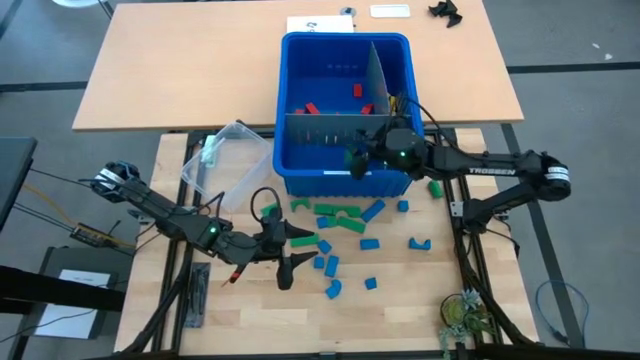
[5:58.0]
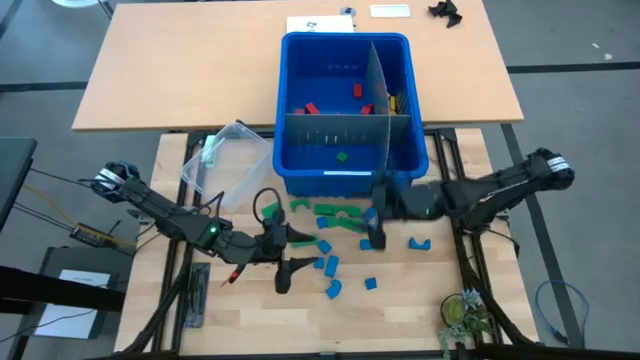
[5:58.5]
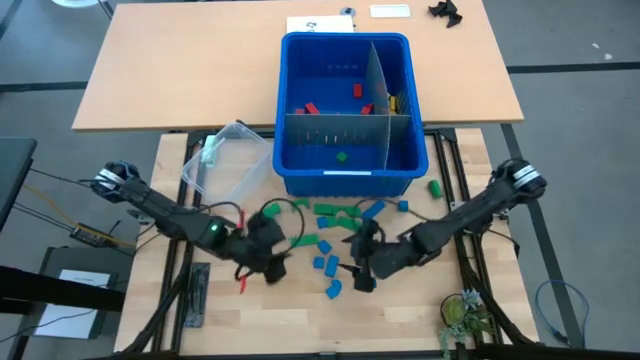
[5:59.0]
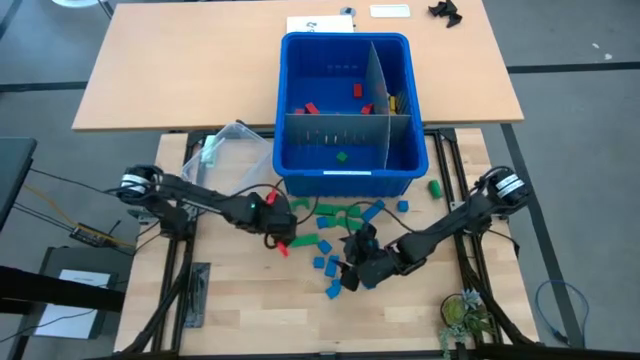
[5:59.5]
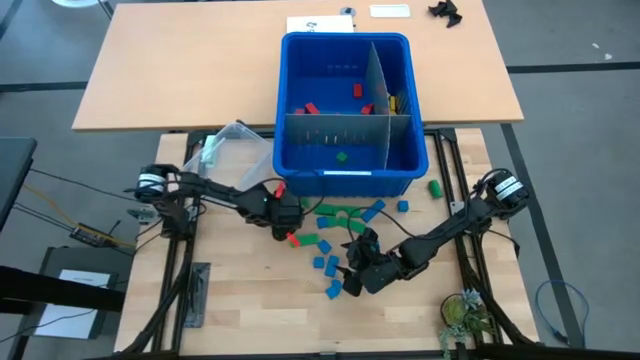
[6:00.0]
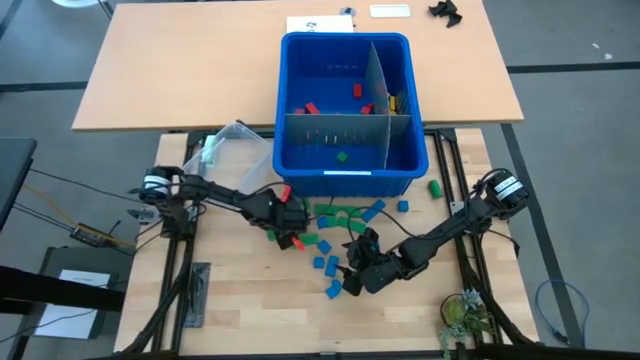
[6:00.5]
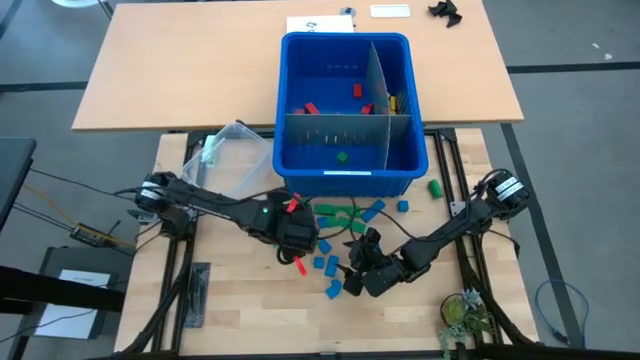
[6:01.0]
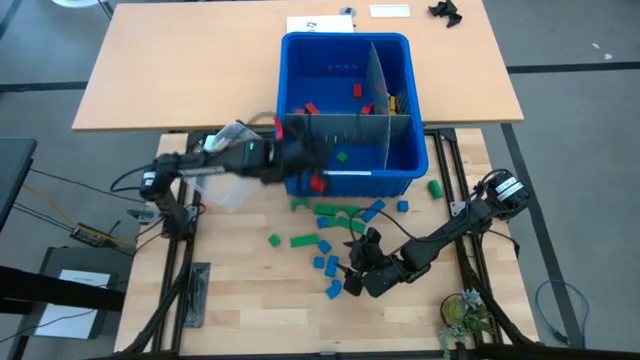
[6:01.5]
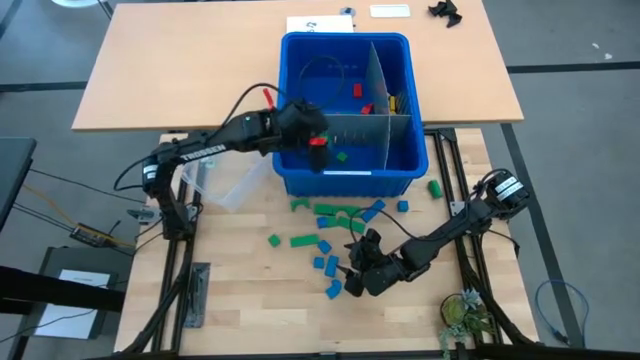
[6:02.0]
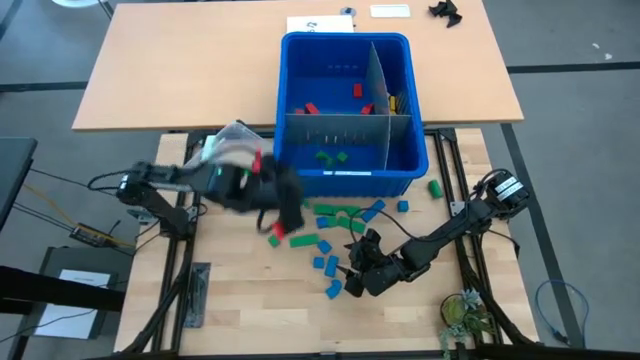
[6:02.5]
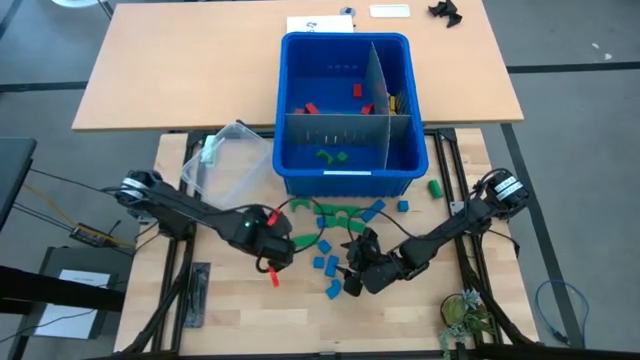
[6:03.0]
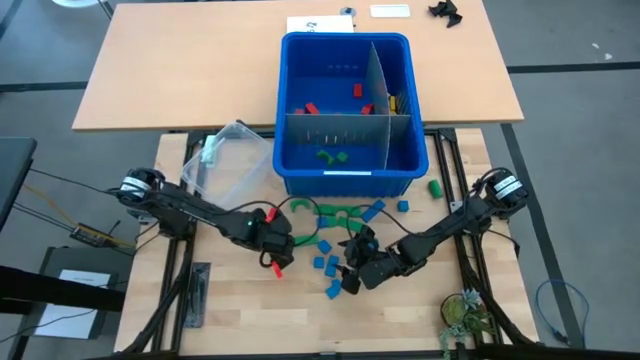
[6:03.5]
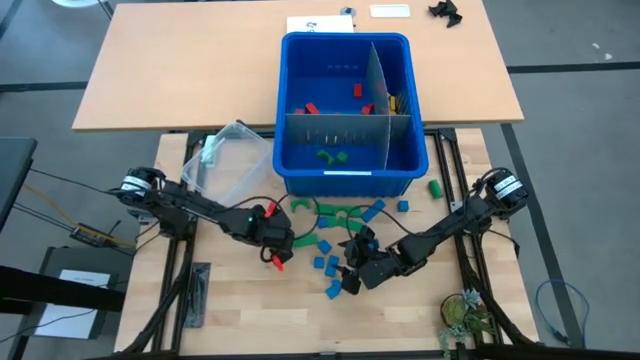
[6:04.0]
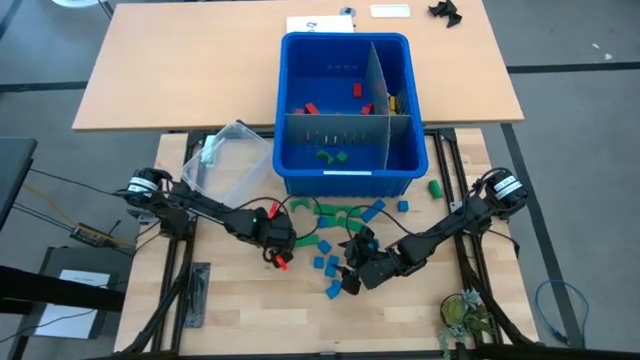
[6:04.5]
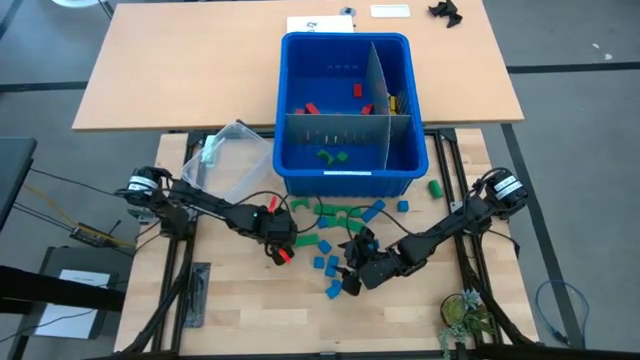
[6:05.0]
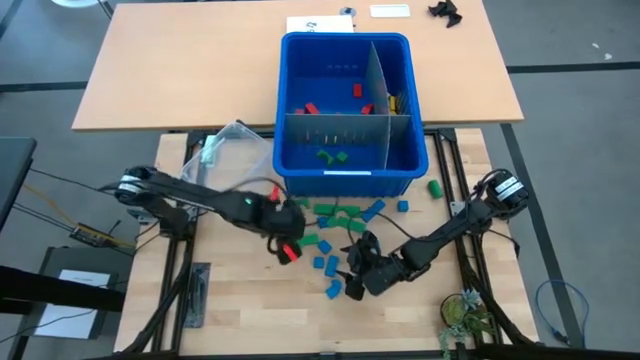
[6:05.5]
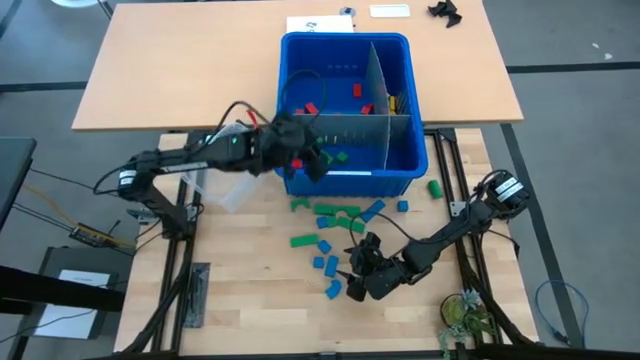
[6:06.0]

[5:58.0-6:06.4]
Task: Sort blocks
Put the green block into the blue bin

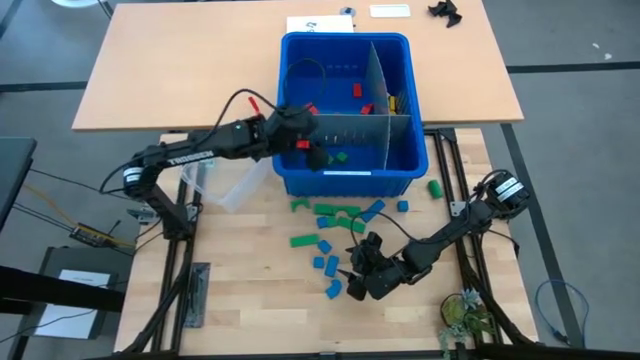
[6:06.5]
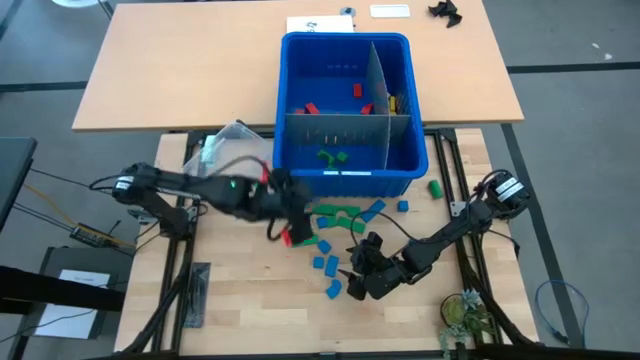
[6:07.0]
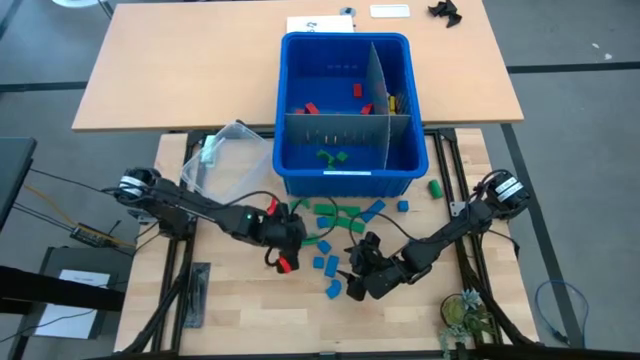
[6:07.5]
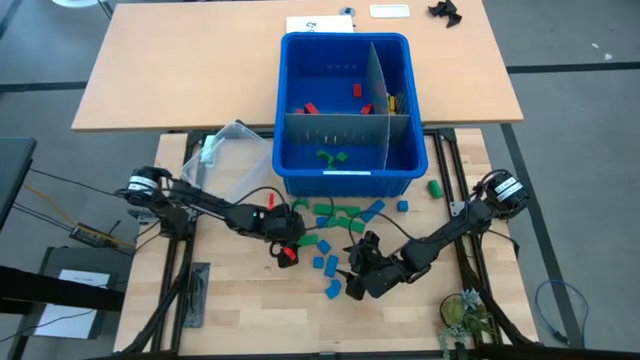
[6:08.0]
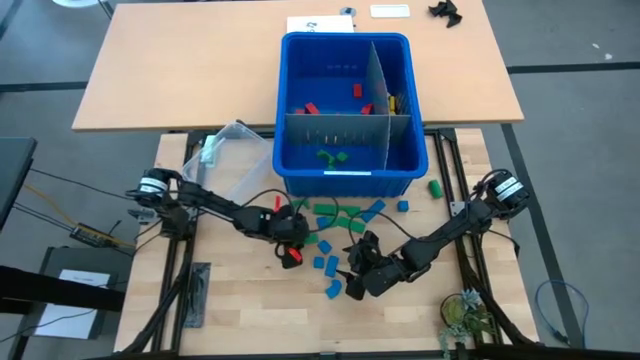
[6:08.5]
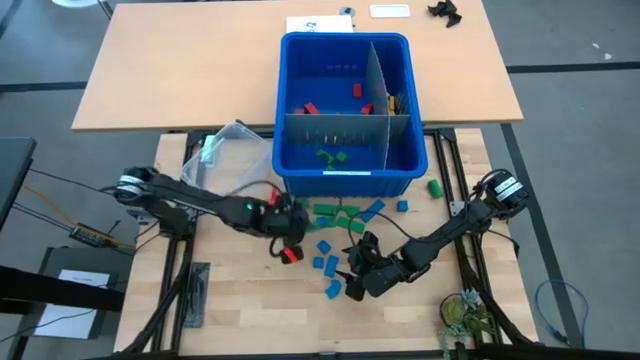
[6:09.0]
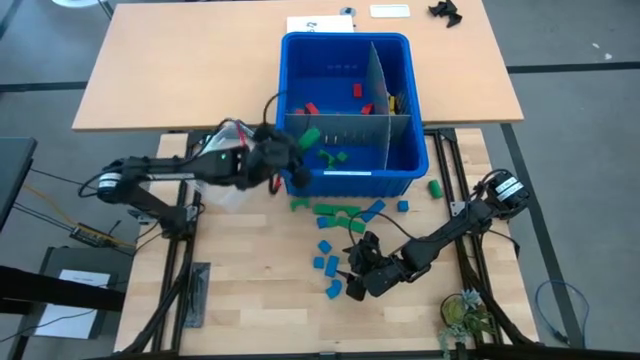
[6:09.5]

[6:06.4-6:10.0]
Put the green block into the blue bin

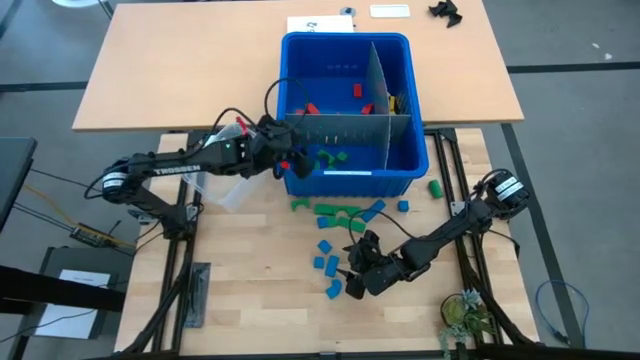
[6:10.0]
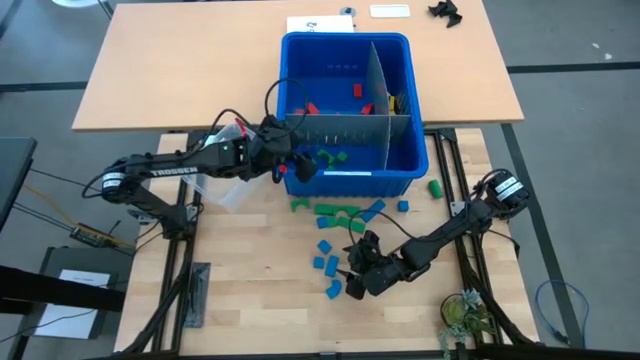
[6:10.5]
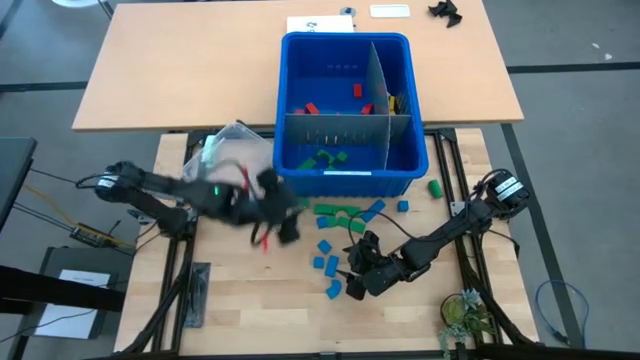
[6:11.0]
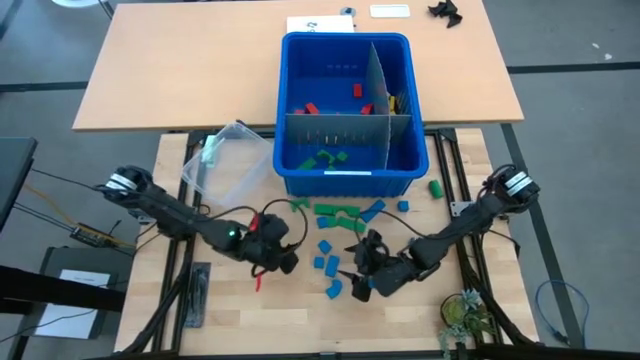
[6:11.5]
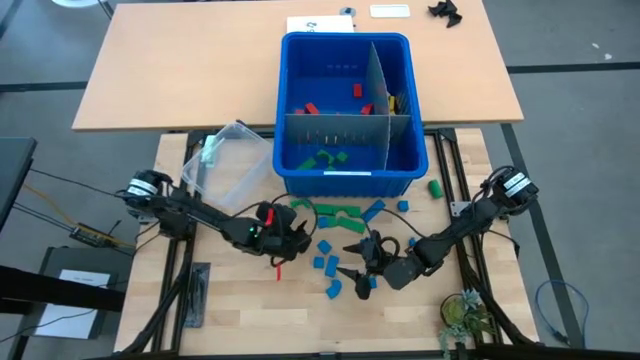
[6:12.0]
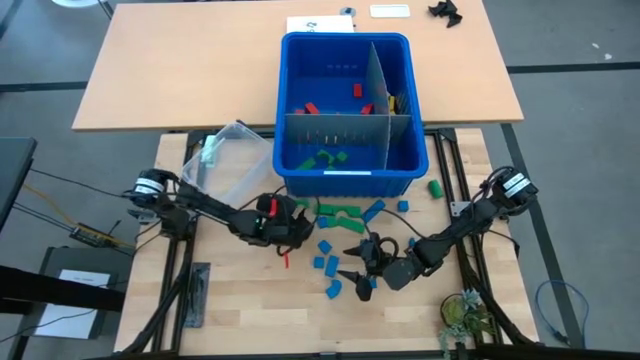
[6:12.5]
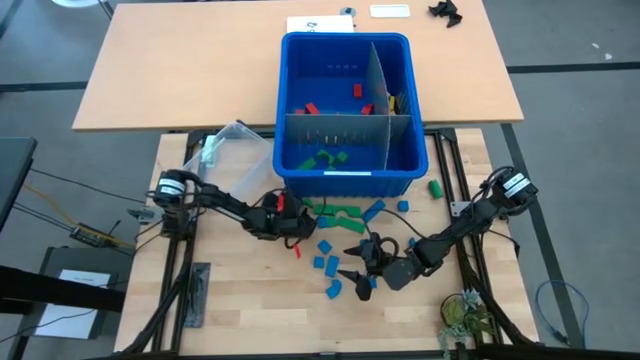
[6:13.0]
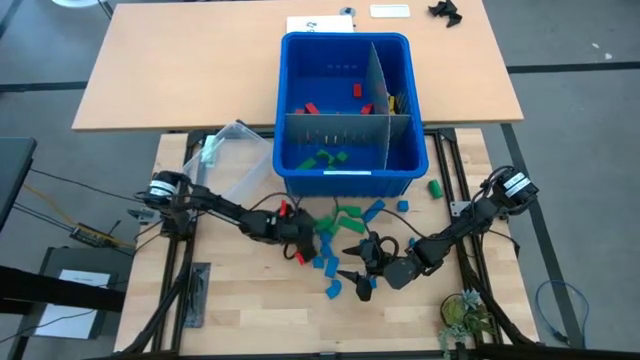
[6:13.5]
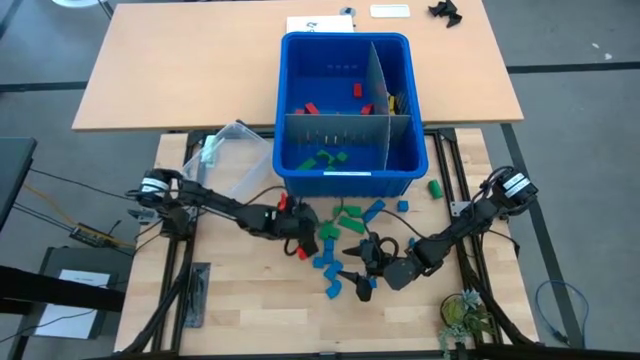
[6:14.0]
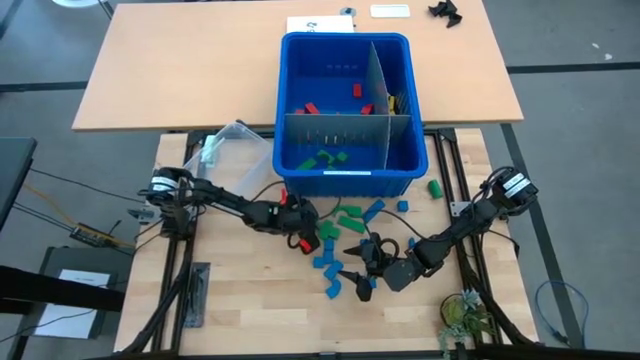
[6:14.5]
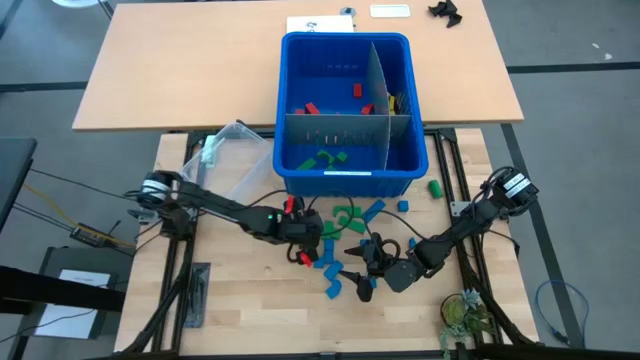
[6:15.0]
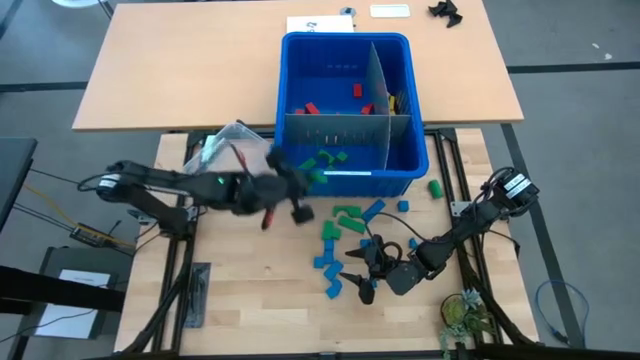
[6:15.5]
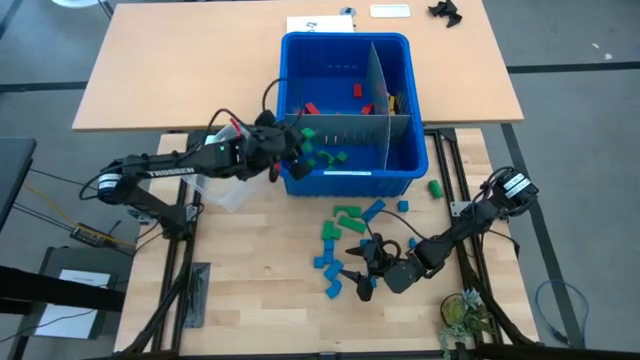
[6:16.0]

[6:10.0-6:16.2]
Put the green block into the blue bin

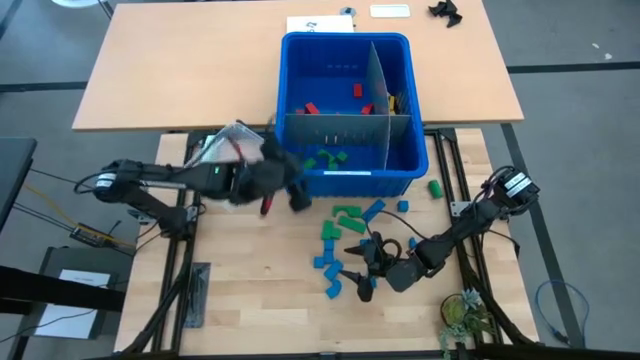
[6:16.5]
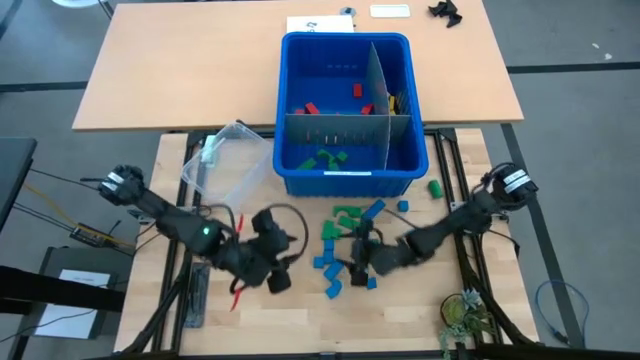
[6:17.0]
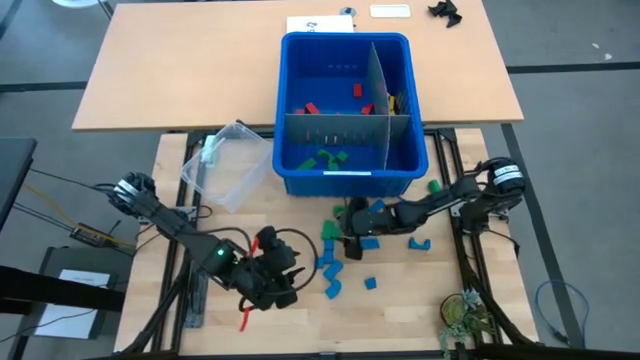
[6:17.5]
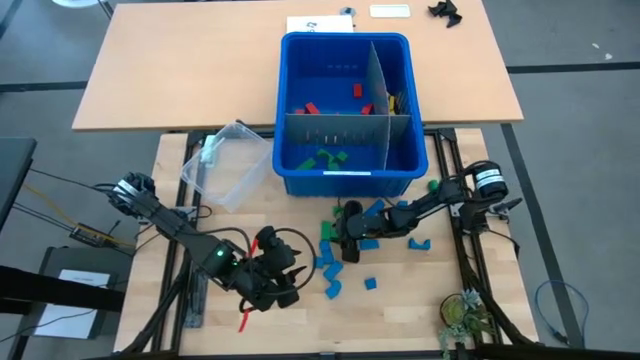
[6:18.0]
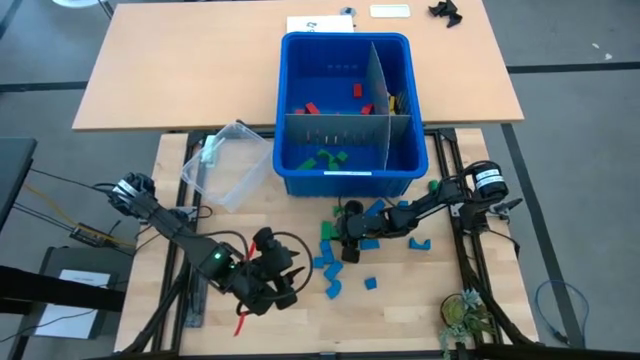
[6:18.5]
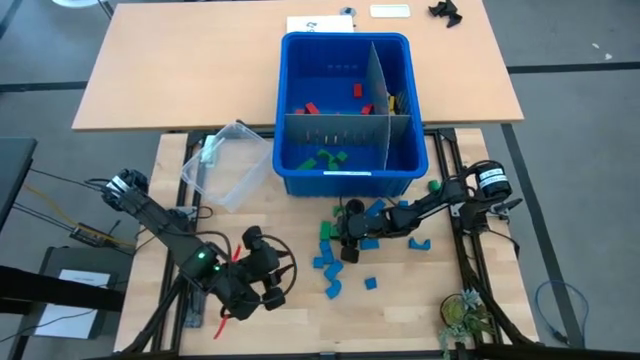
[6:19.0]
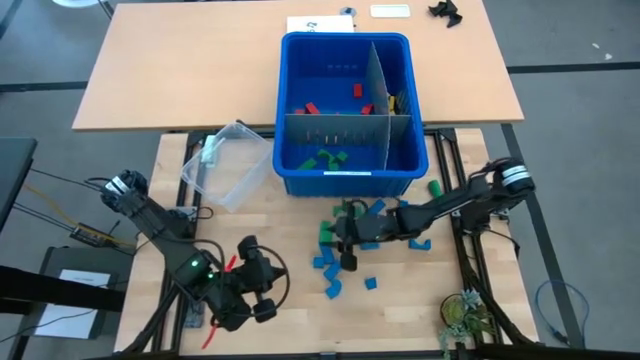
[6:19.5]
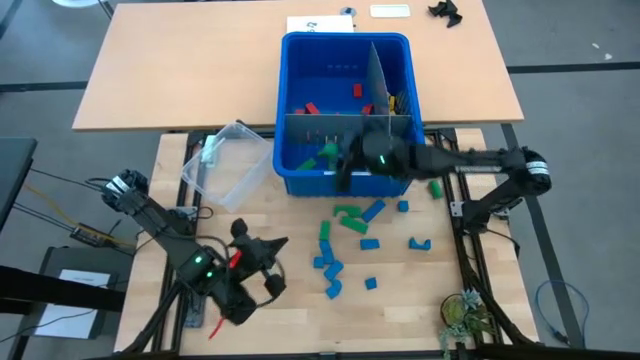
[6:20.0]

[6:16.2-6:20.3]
Put the green block into the blue bin
